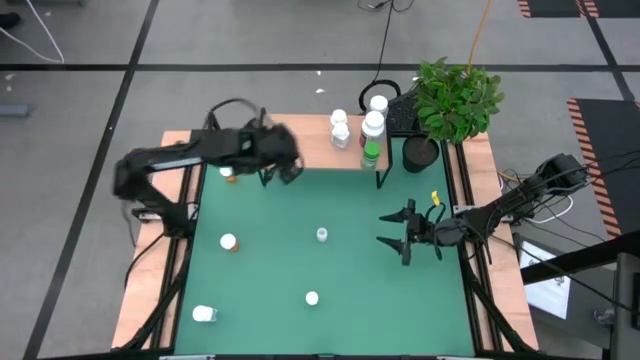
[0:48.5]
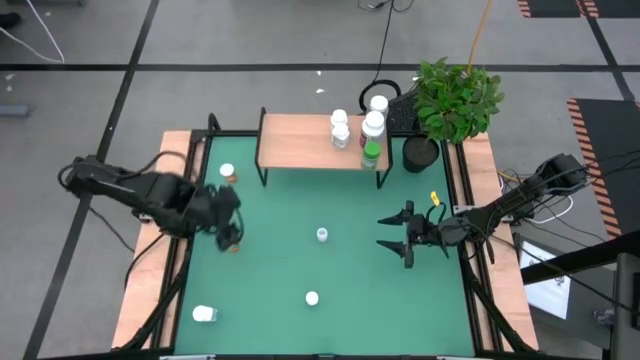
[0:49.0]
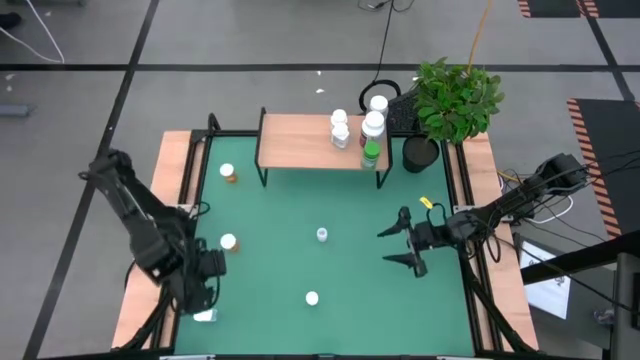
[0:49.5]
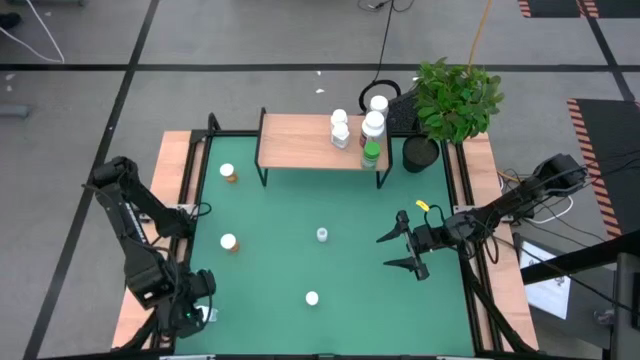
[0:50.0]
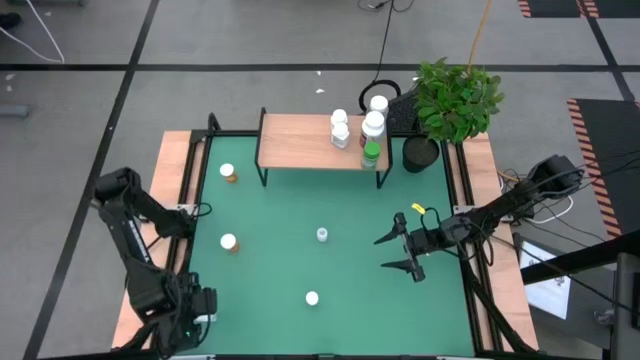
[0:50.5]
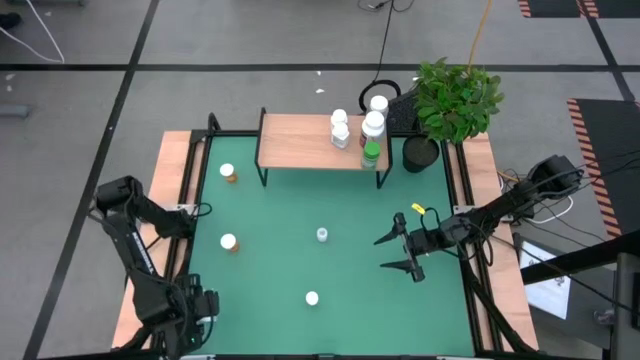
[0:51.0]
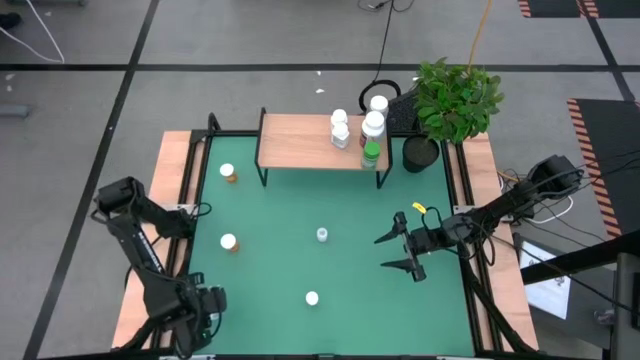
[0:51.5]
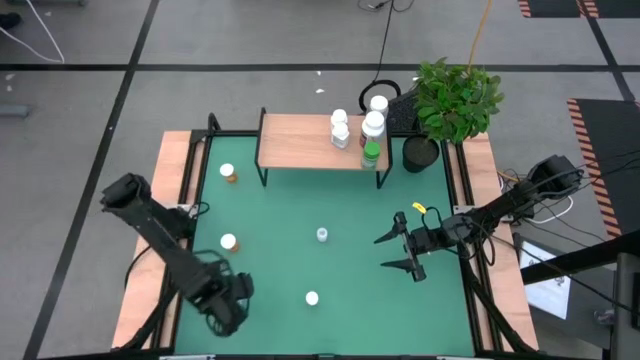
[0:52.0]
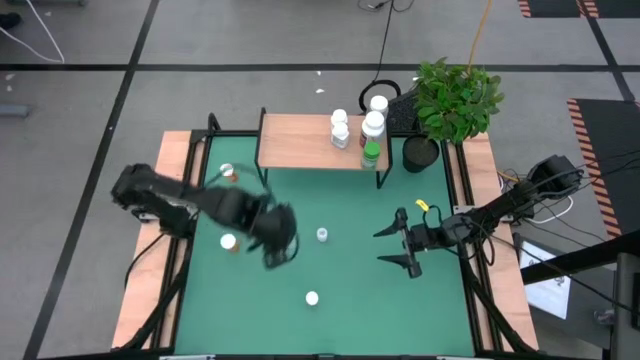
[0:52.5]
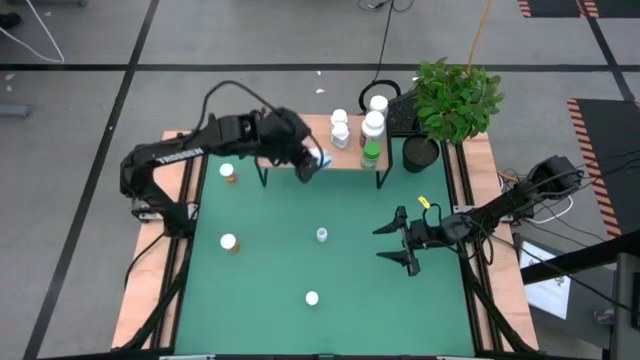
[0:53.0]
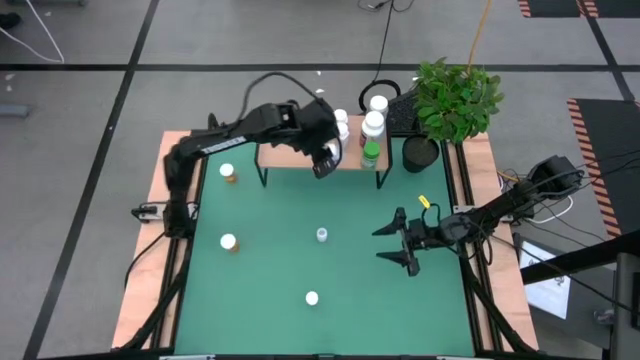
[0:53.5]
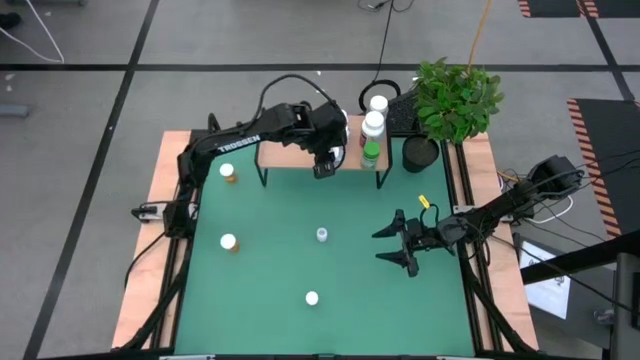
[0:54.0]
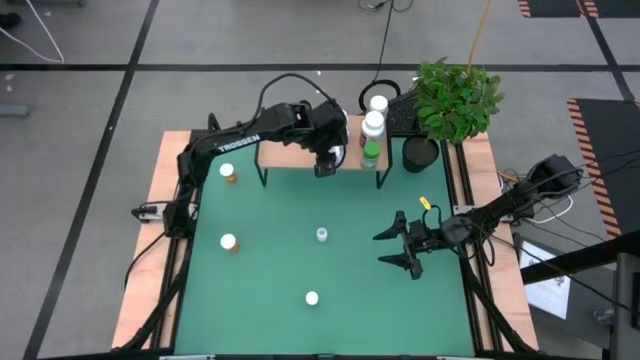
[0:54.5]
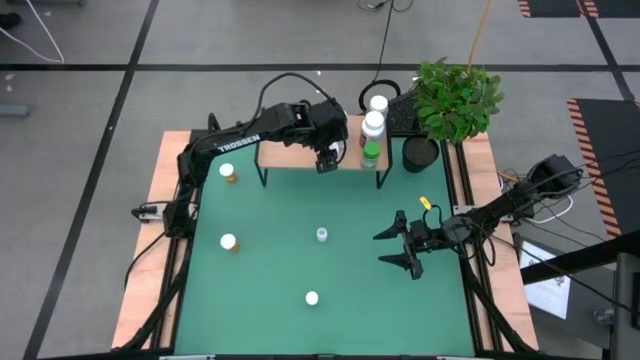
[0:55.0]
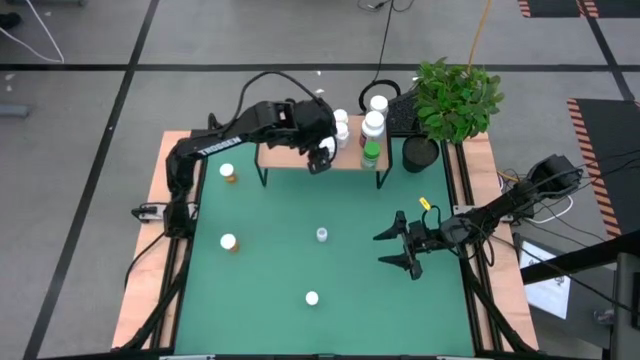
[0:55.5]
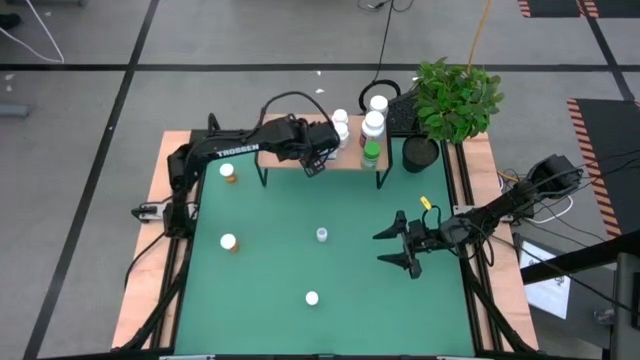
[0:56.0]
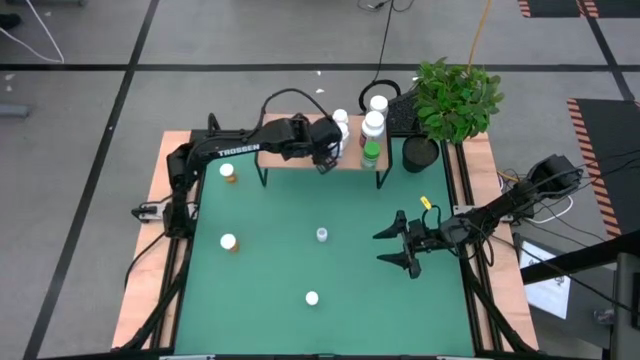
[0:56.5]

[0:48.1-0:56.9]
Task: Pick and place medicine bottles onto shelf by color
Align the big blue pill bottle with the other big blue pill bottle on the shelf

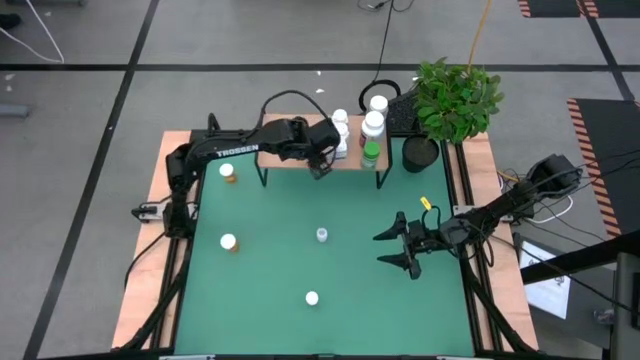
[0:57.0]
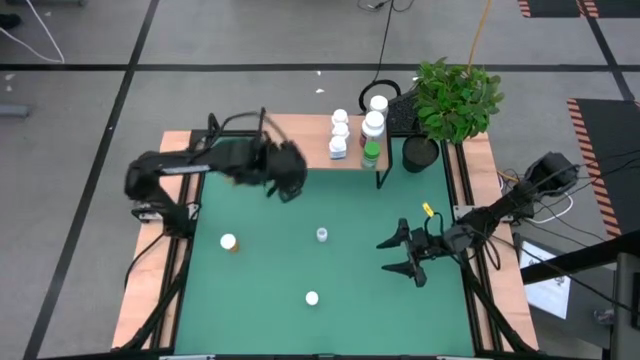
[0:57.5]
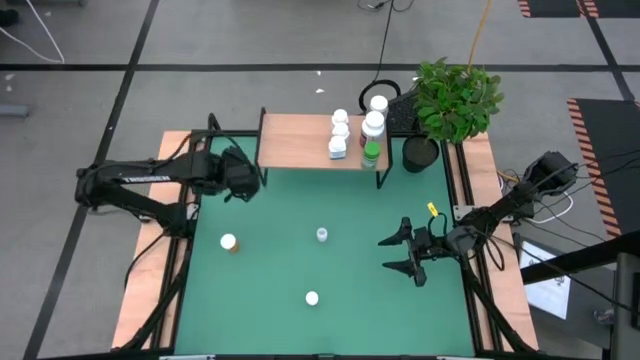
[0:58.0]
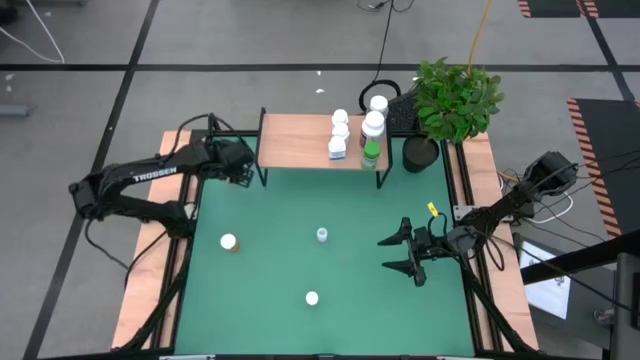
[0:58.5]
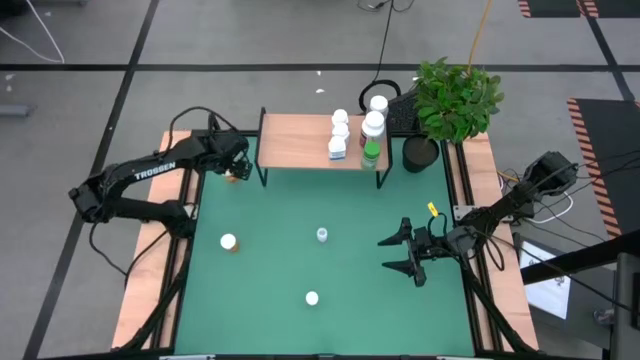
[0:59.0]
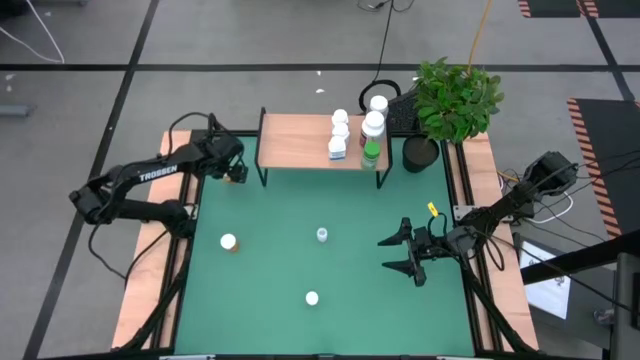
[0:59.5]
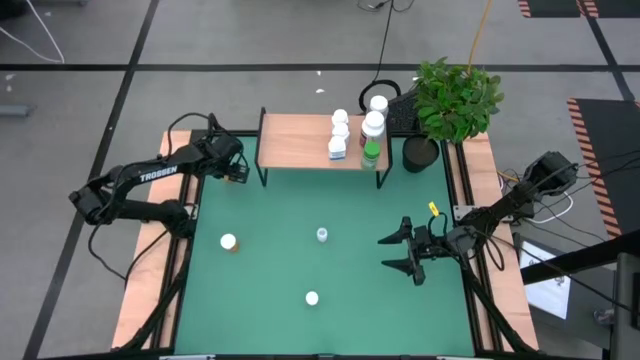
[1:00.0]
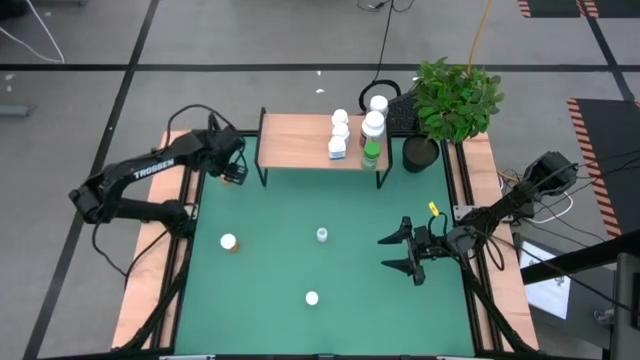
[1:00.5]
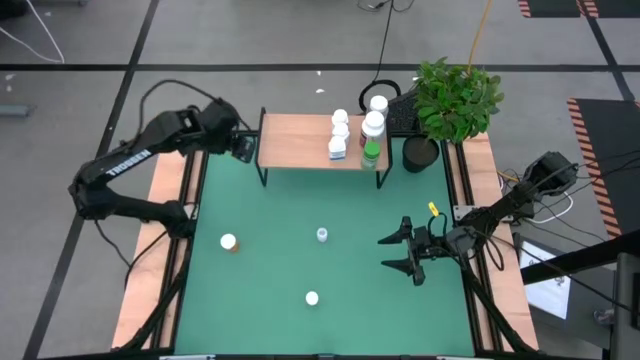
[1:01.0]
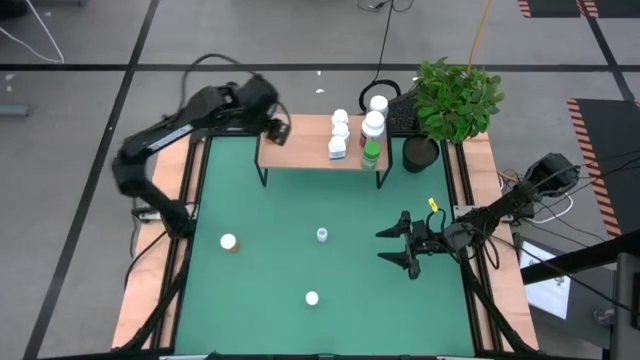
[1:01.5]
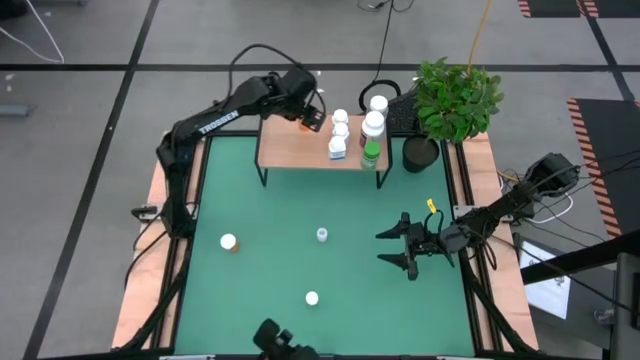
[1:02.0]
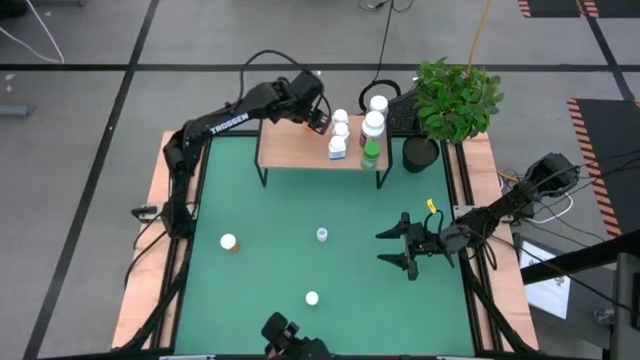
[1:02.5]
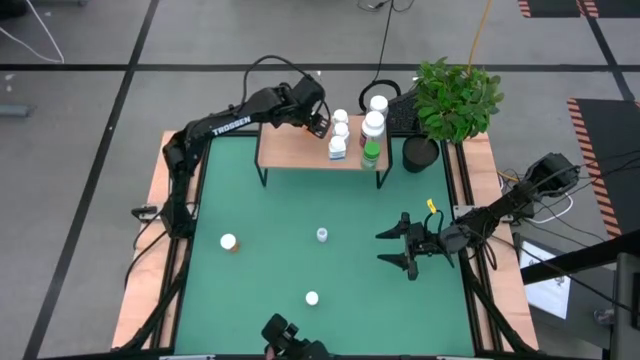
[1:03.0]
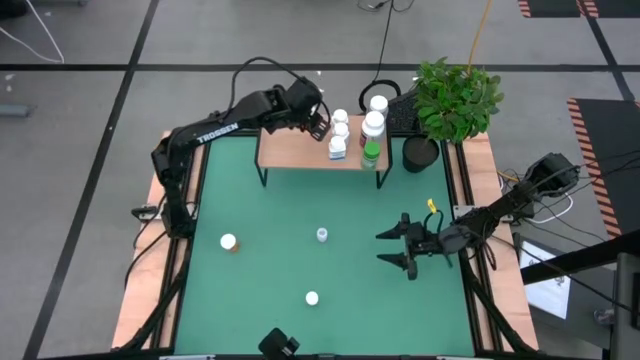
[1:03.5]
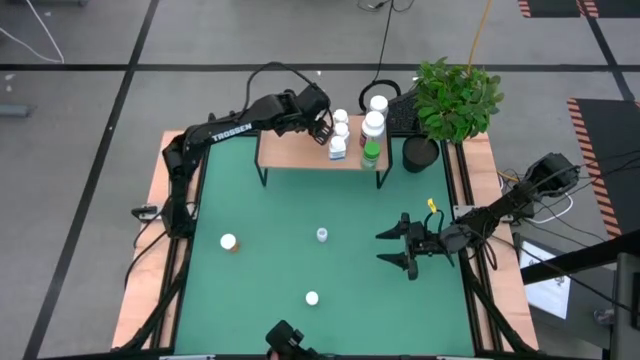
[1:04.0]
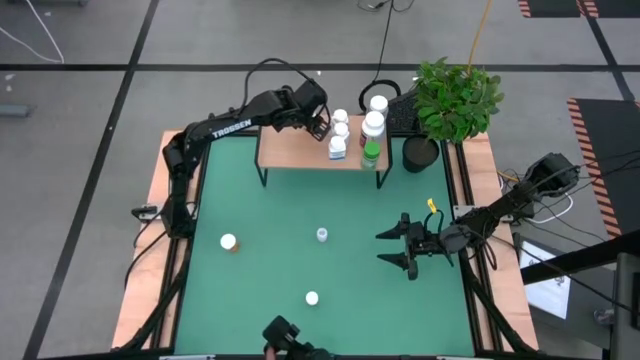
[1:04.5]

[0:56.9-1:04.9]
Put the top big orange pill bottle on the shelf

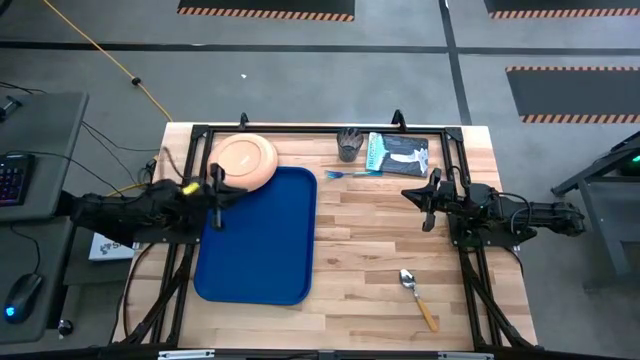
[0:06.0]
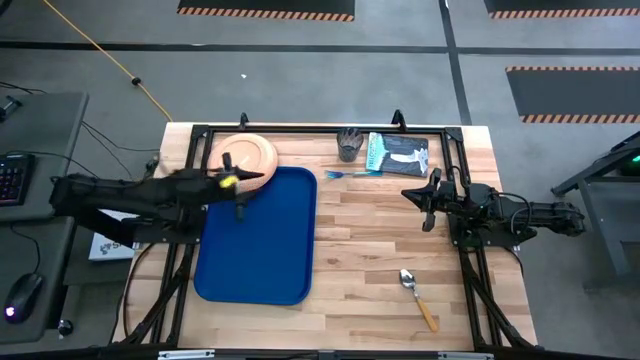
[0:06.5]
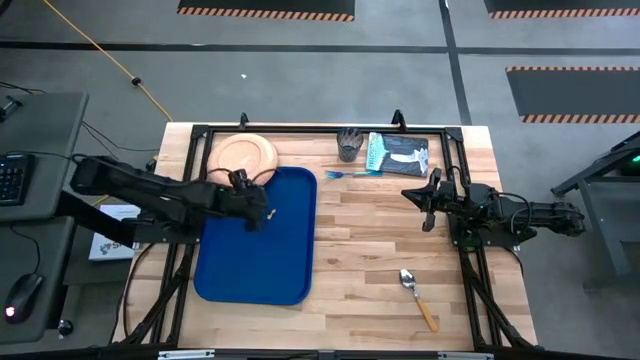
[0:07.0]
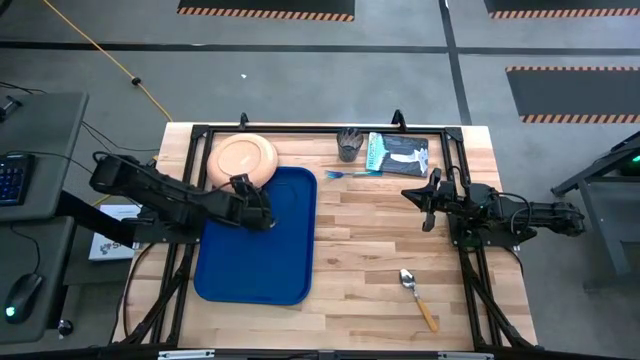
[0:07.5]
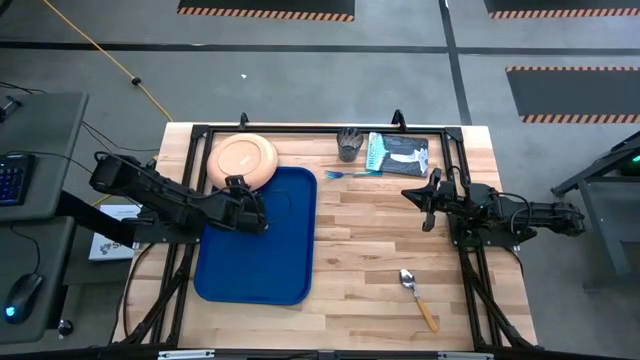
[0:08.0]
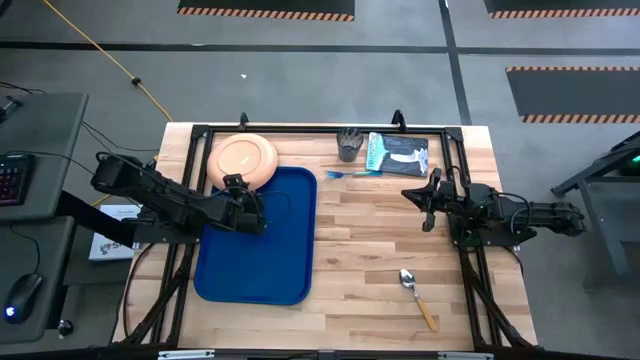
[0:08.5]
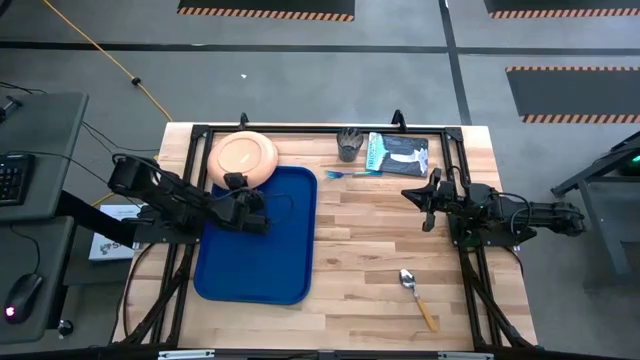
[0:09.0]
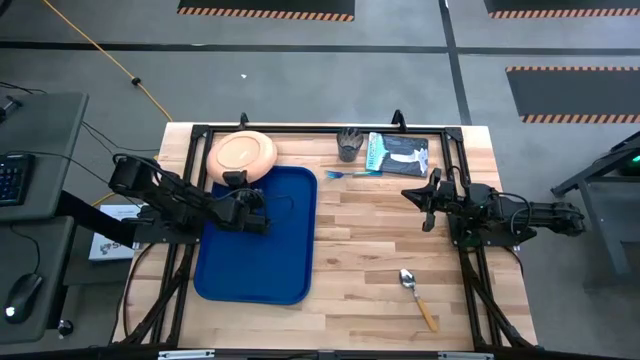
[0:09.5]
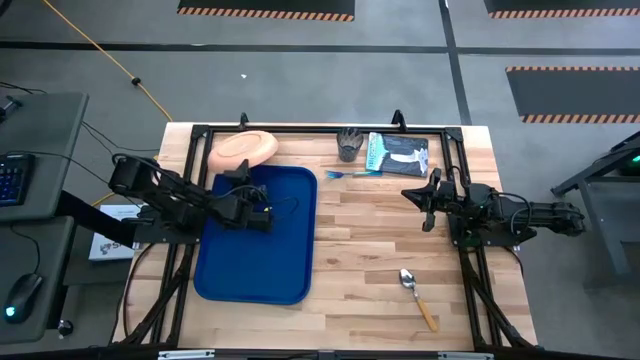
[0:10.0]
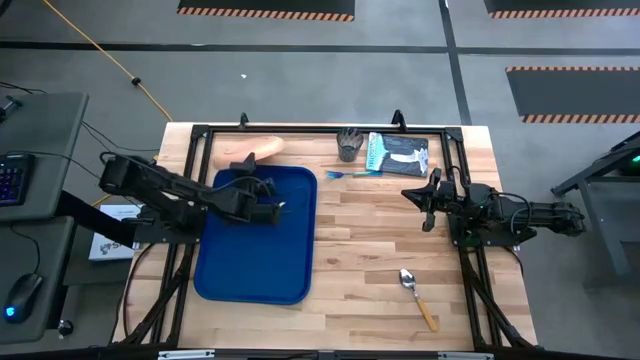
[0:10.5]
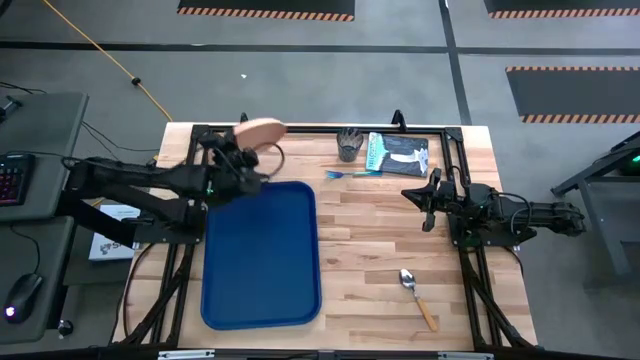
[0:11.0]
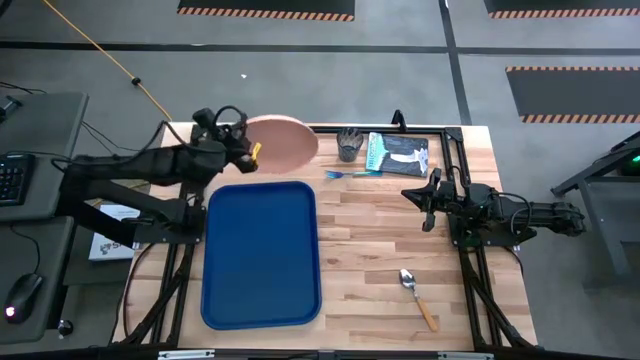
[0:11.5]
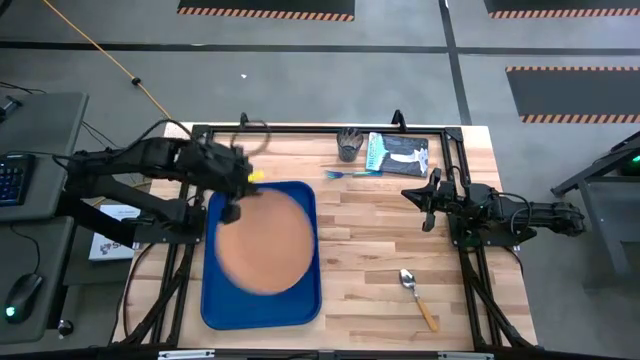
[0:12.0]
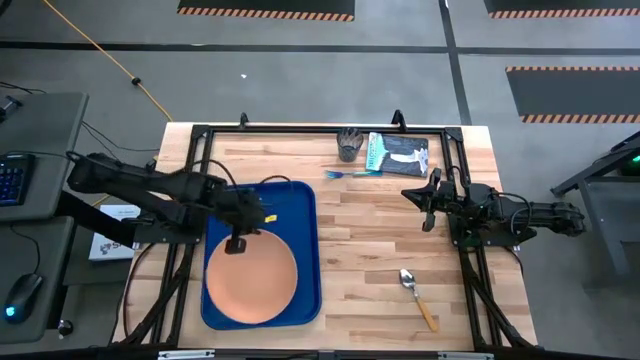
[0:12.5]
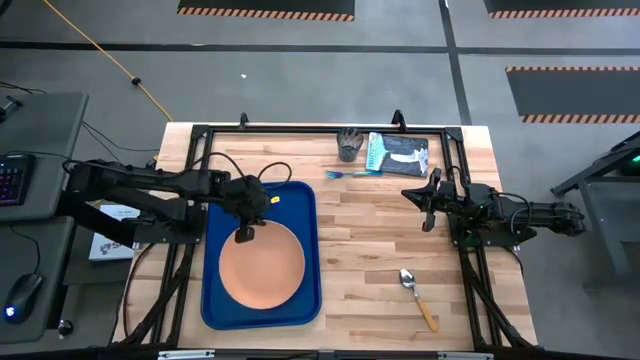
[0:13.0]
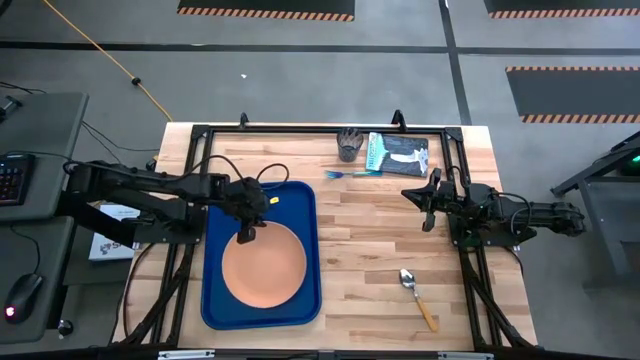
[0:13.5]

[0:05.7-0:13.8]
Task: Pick and place plate/cup/fork/spoon on tray
Put the light orange plate on the blue tray
